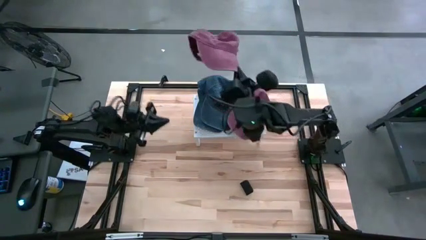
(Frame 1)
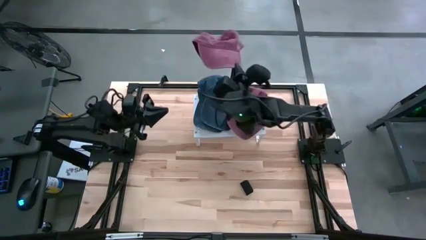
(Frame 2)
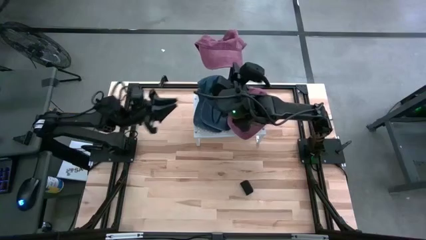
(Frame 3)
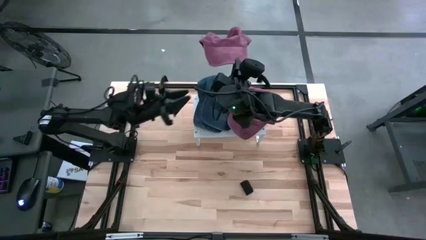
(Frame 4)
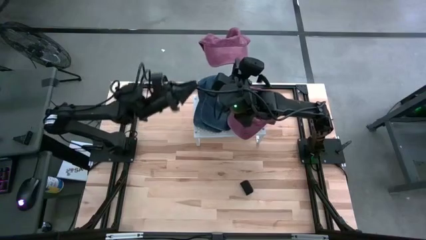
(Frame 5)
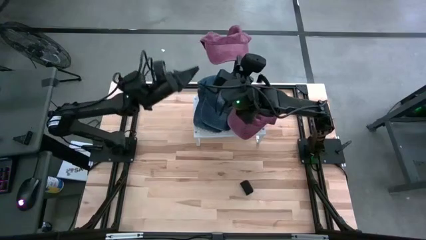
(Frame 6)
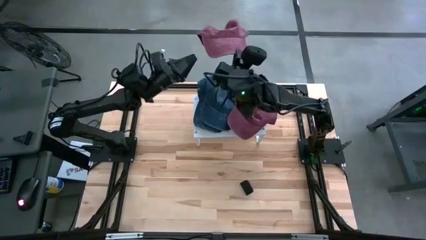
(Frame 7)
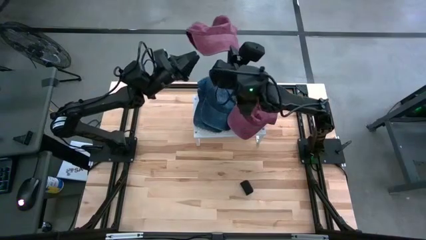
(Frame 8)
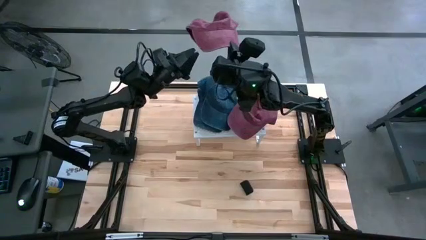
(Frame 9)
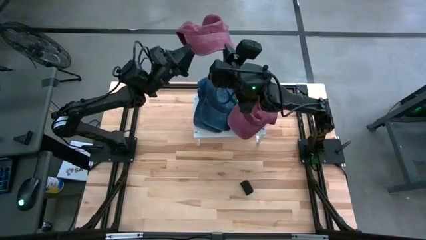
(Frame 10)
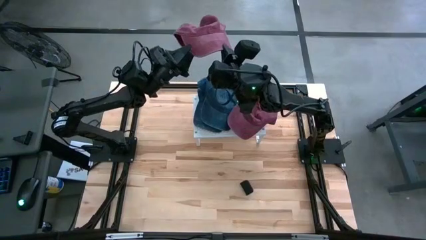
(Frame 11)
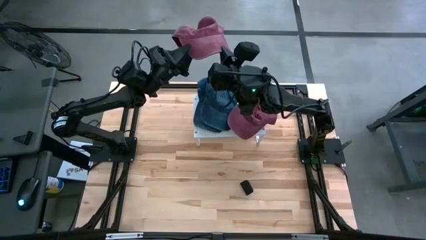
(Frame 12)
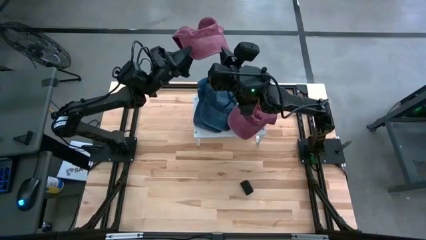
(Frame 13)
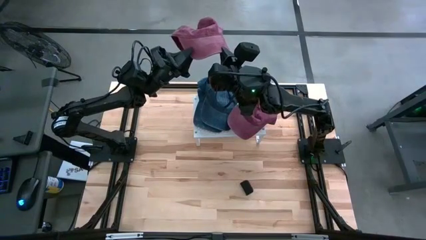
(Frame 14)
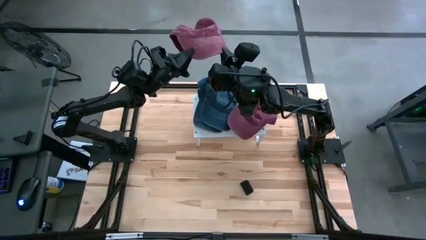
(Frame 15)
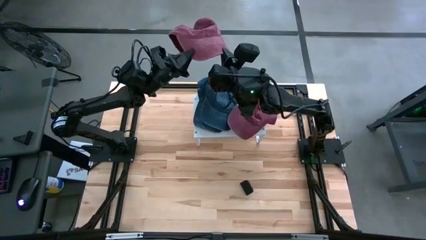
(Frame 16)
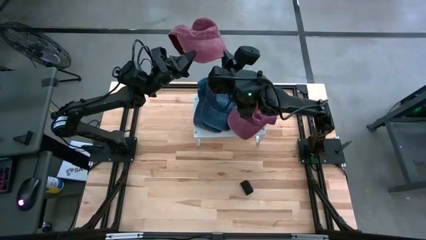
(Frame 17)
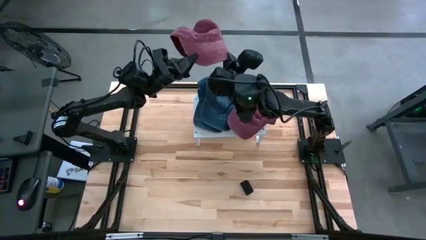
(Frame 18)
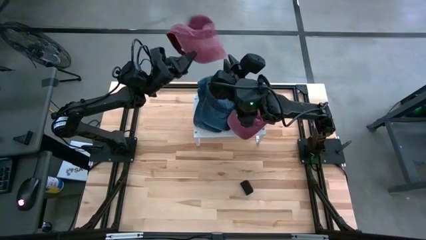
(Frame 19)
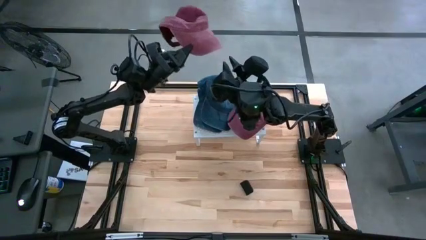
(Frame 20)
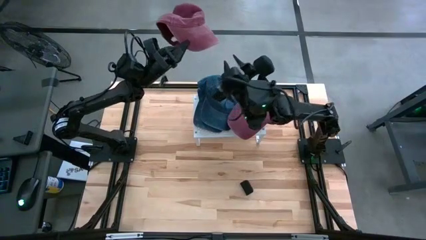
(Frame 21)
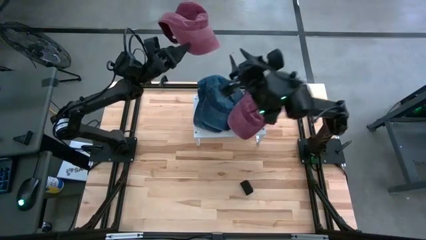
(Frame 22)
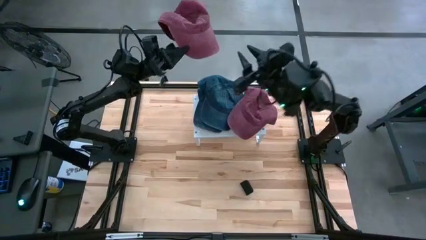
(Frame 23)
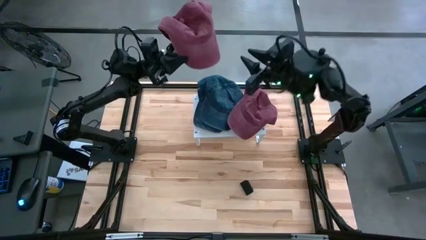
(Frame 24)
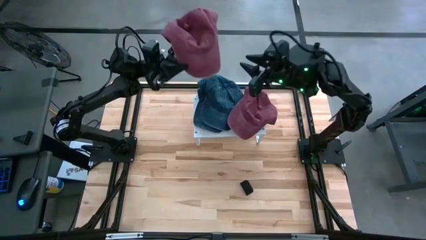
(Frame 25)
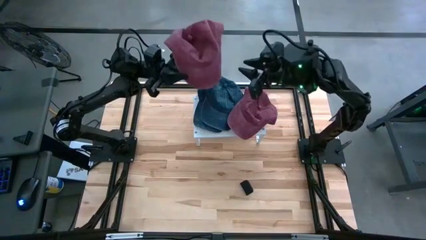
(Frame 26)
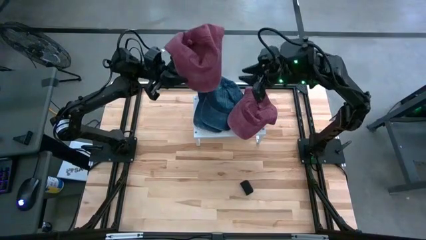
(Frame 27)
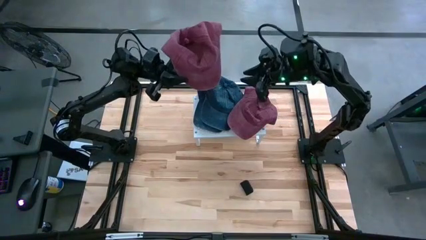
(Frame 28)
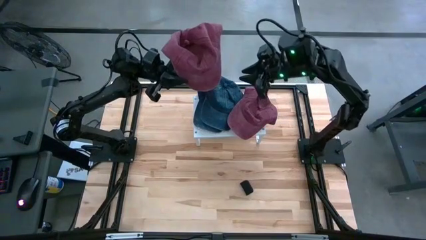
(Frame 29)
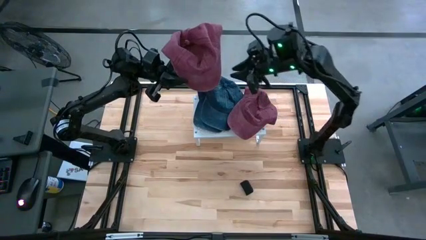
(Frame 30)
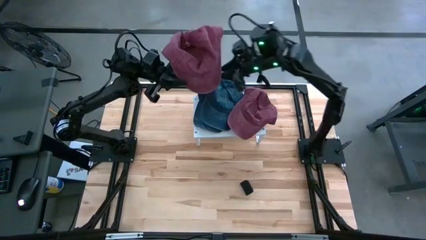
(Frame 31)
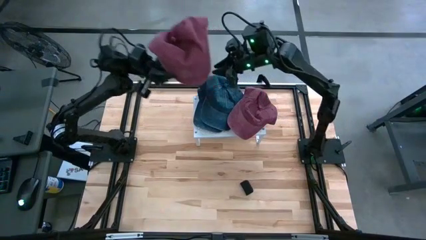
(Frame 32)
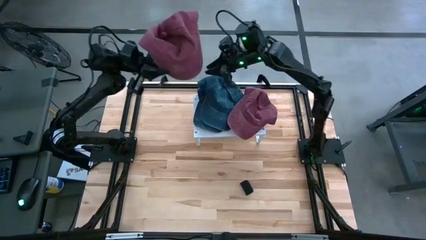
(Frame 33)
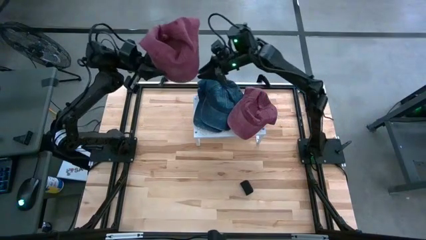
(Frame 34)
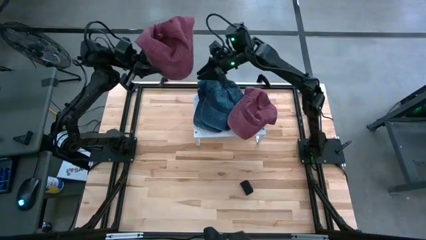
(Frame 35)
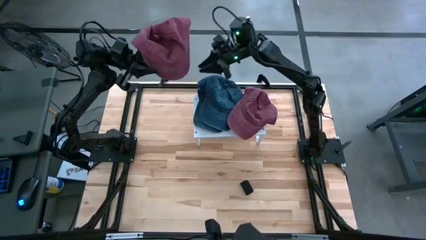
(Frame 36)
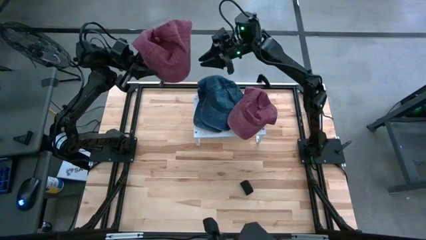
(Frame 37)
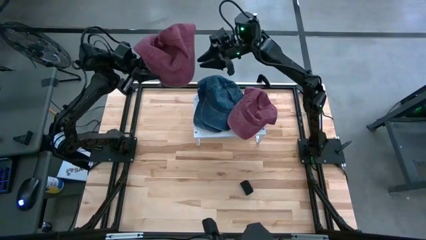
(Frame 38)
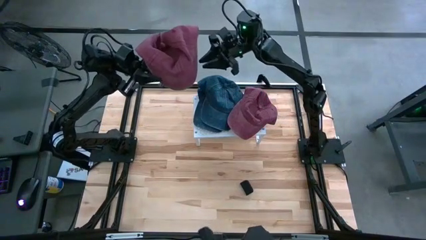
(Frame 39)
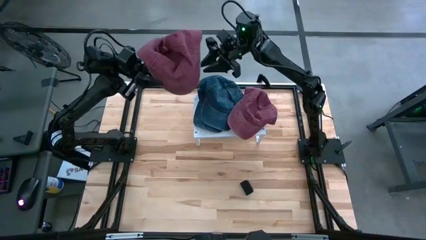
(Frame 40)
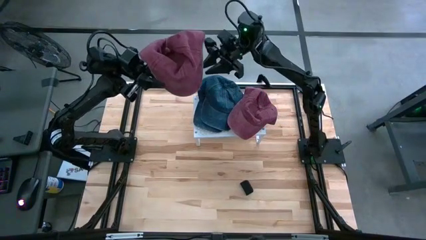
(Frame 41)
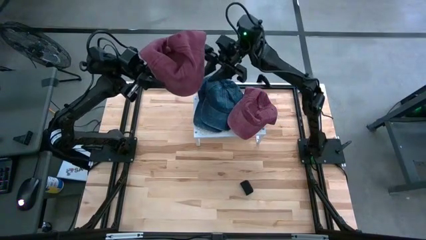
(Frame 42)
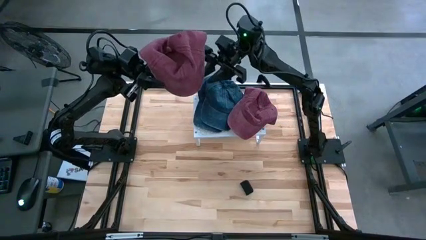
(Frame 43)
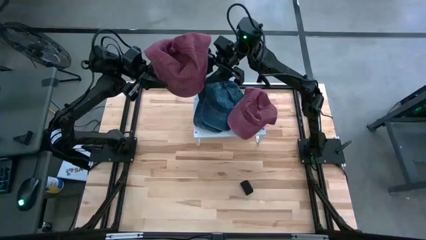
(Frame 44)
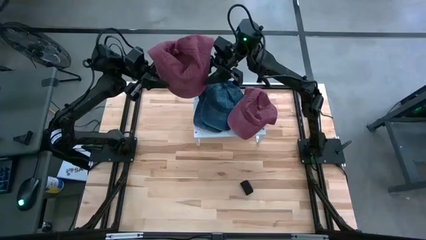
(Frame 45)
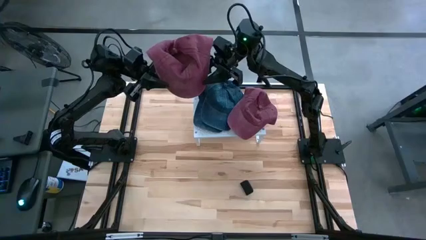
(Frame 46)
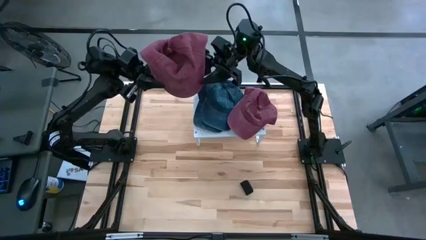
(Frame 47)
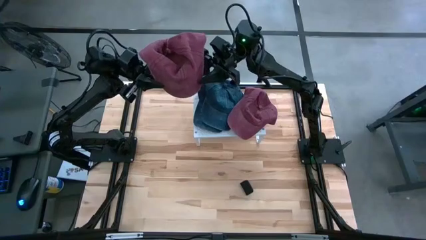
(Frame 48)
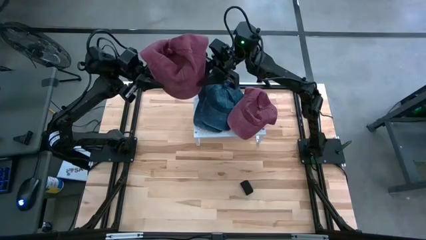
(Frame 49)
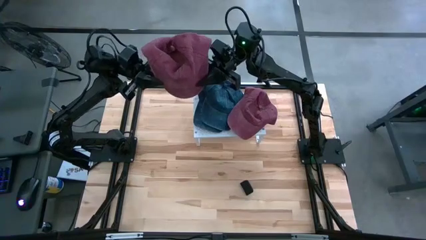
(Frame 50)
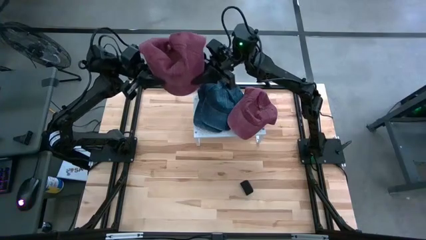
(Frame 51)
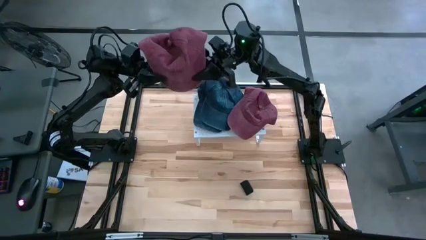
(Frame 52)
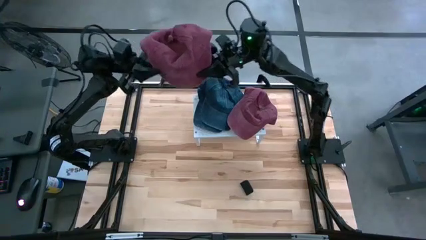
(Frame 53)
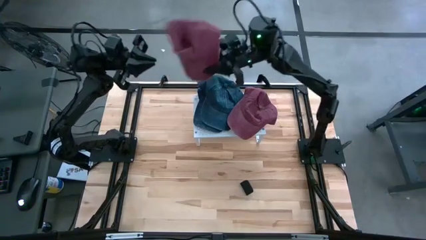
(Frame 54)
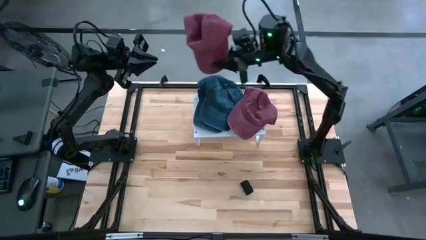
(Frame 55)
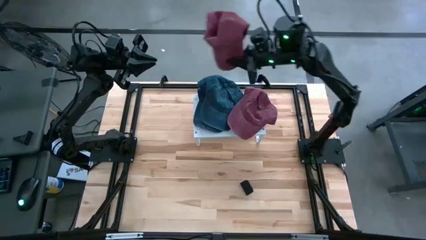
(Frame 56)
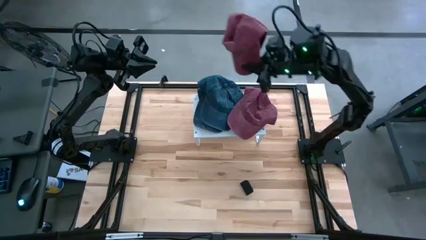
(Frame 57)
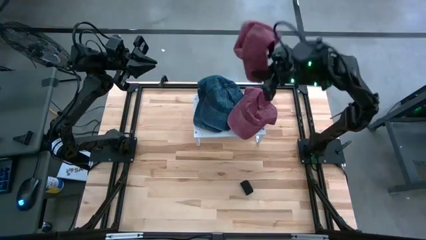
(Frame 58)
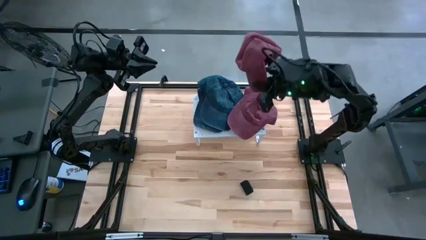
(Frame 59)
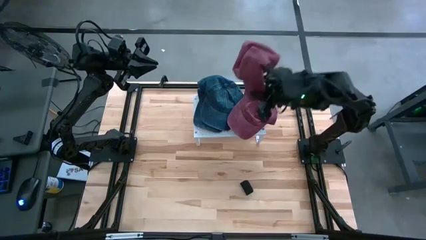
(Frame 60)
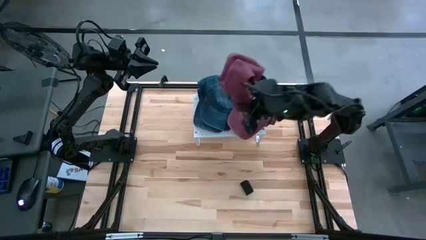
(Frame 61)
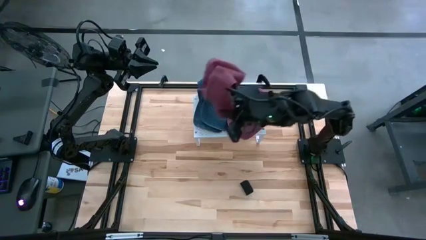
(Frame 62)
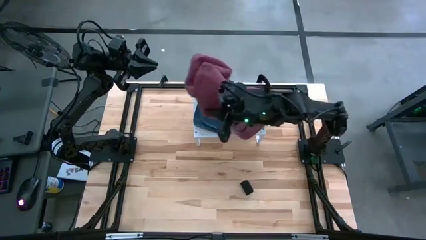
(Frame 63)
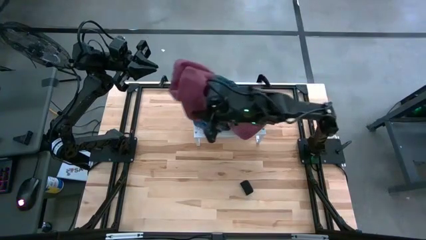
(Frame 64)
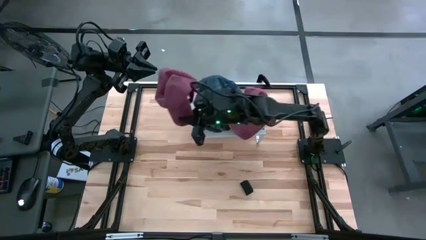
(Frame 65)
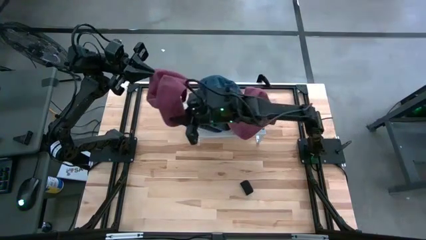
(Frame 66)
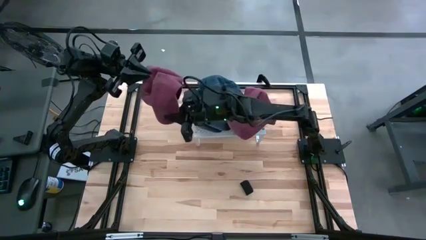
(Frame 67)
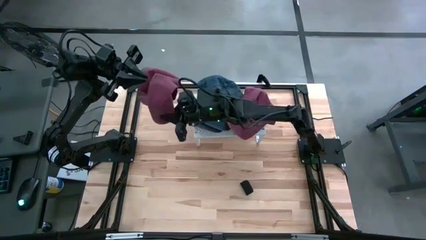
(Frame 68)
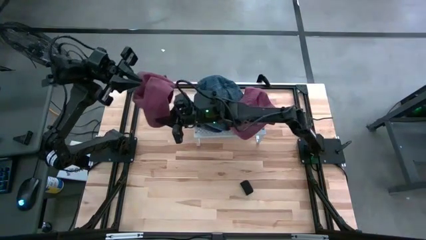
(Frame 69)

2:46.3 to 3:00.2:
Task: Pick & Place hat
Stack the red cap on top of the other red cap on the shelf
